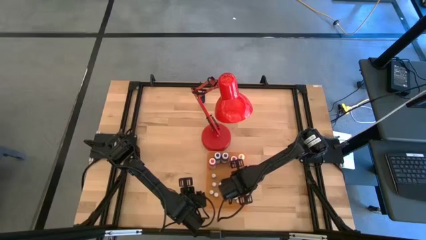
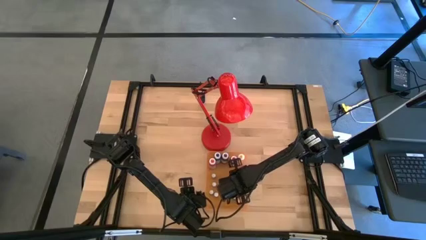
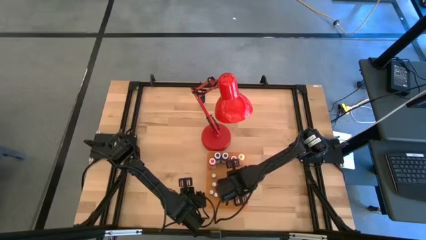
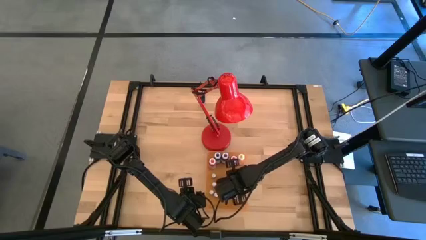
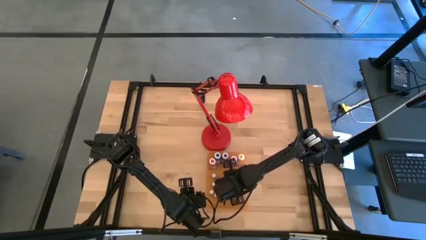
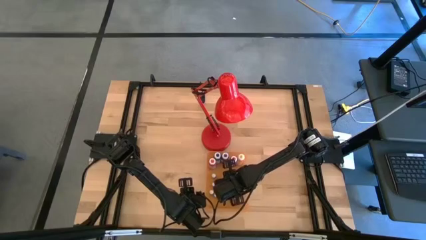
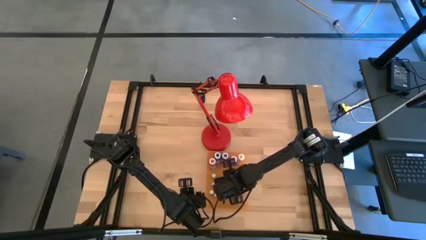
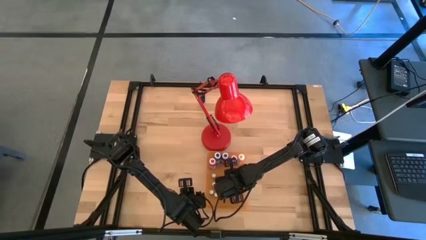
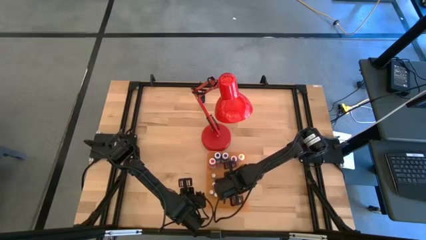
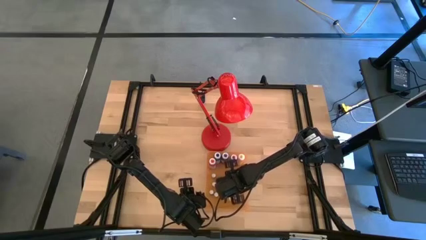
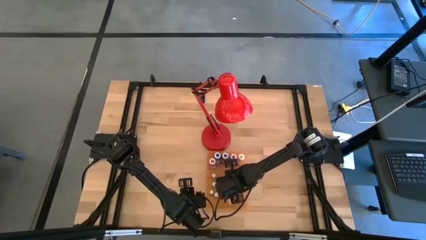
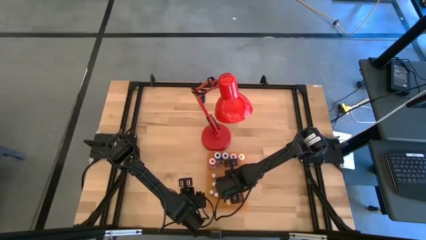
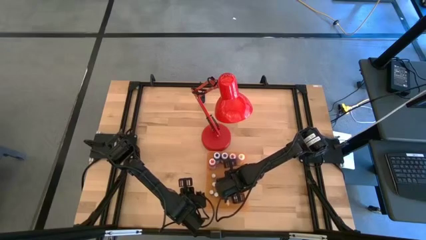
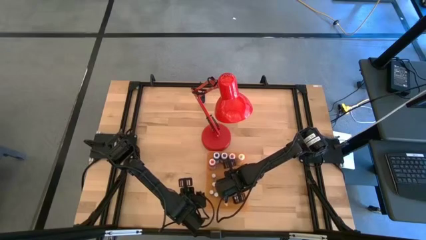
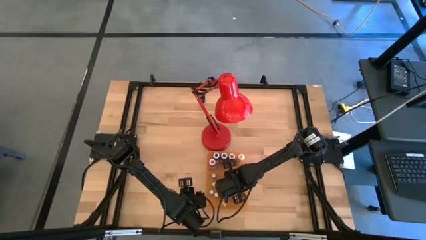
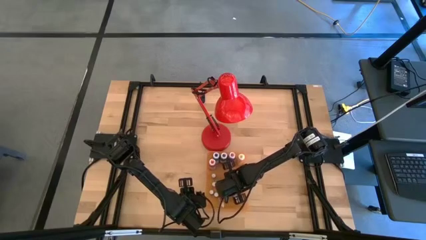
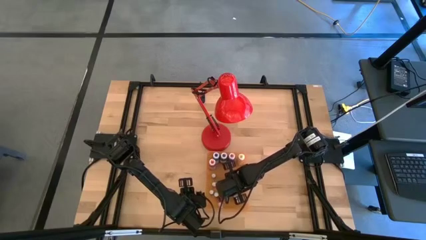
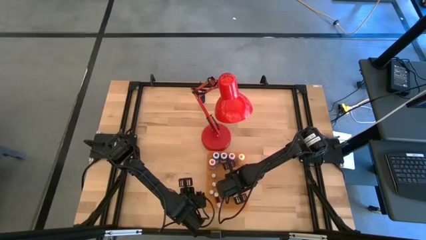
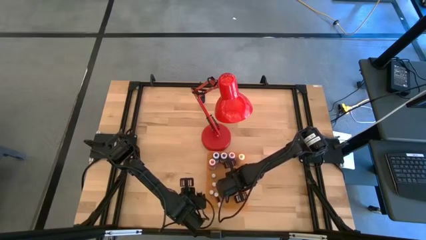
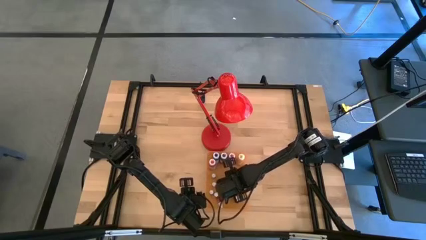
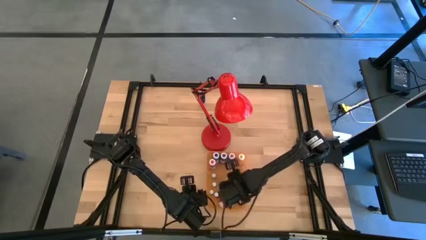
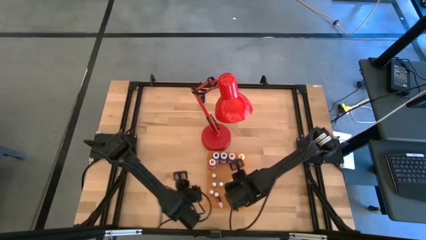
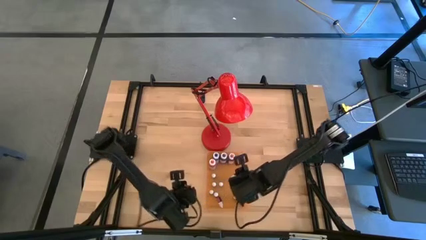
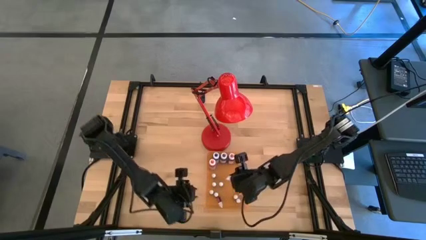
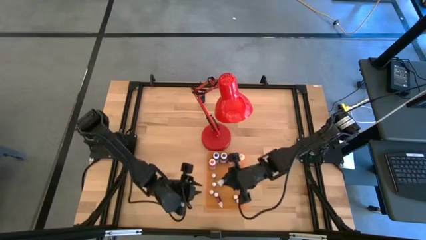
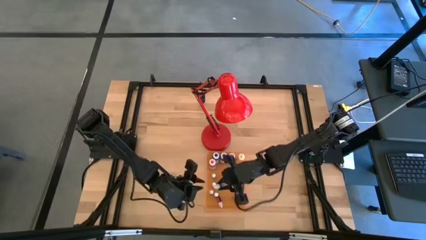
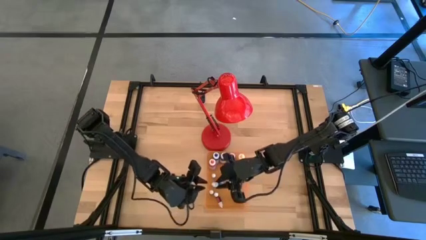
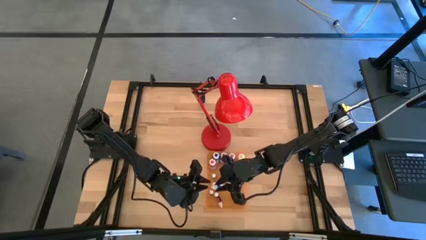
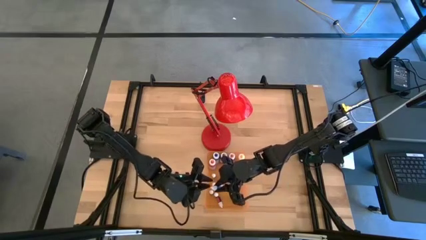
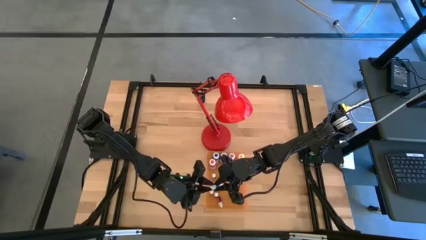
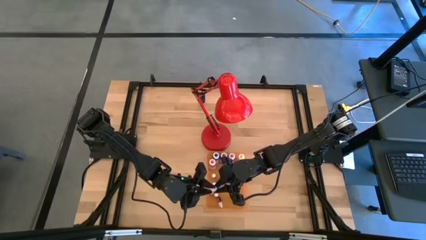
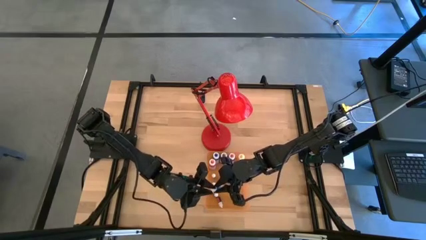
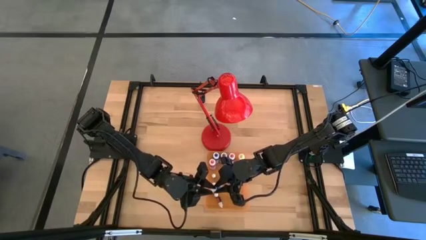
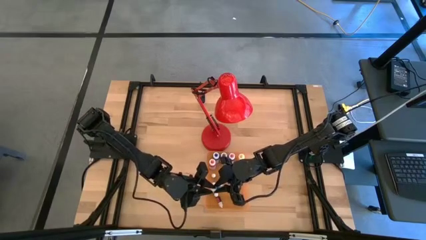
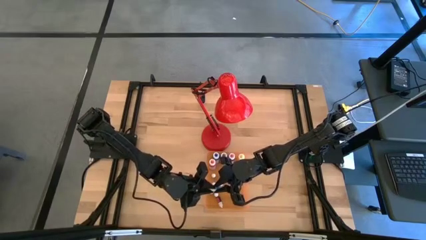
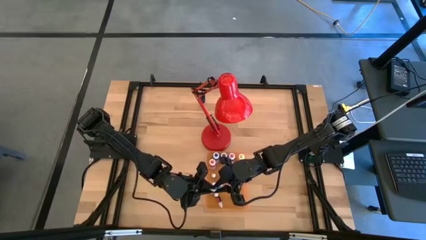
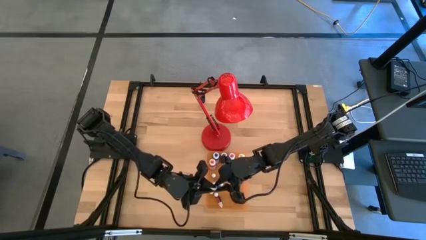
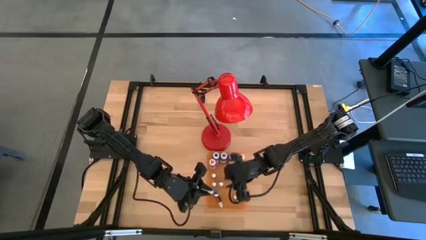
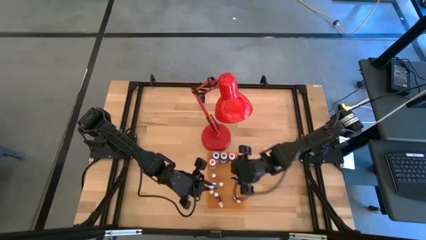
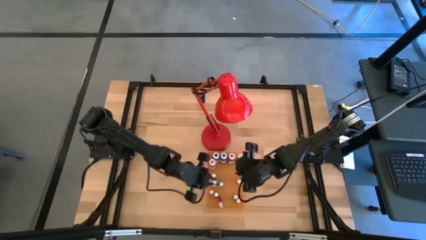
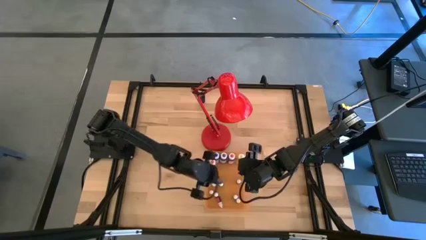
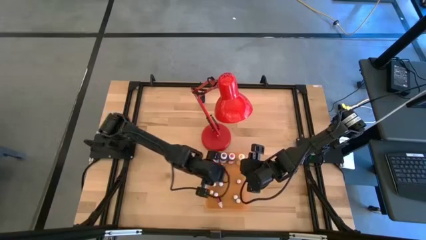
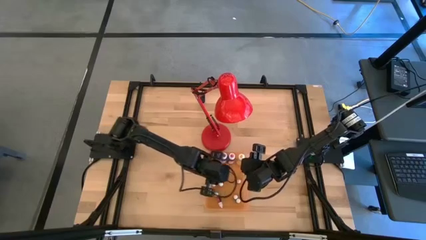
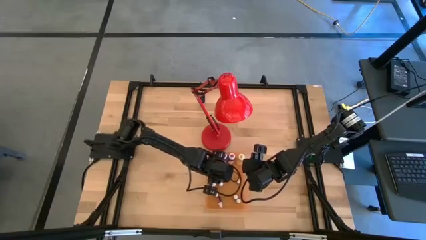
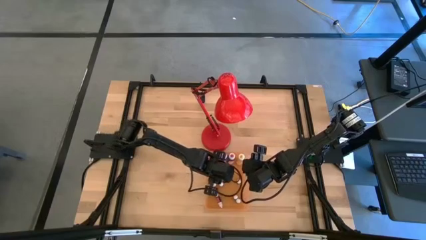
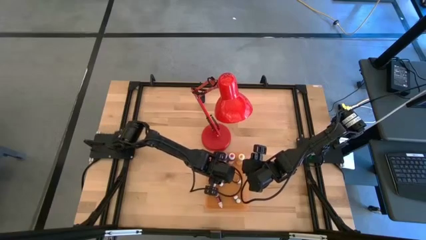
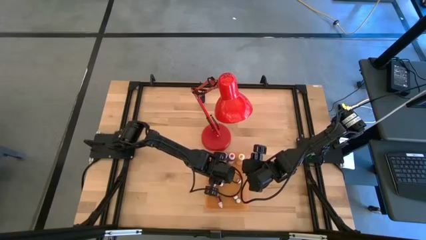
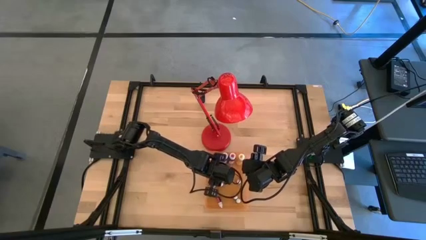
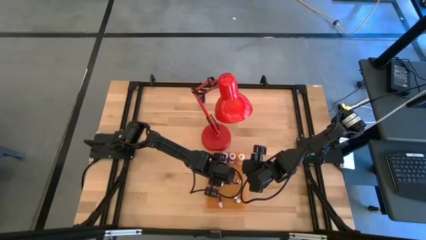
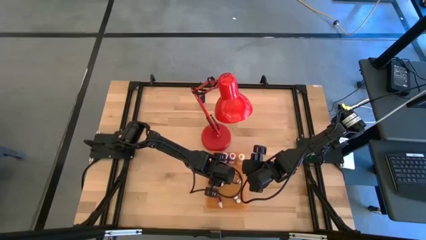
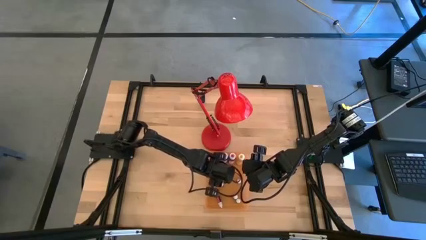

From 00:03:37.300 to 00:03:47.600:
Task: Pick & Place food coloring
Adjust the light blue food coloring bottle in the orange bin

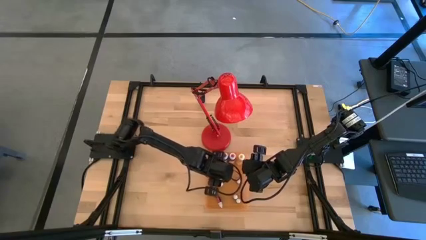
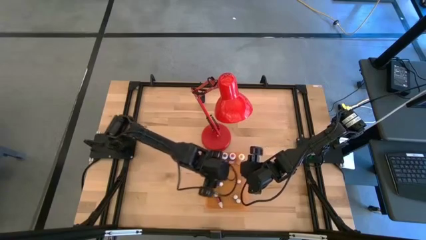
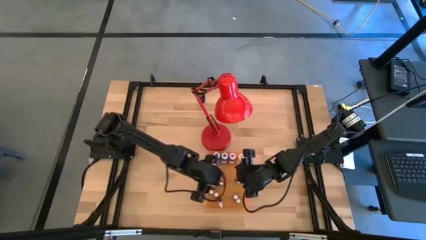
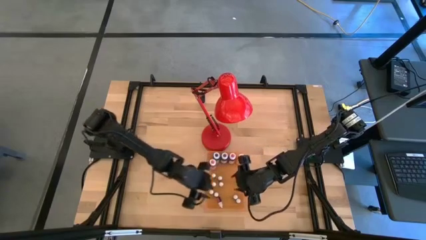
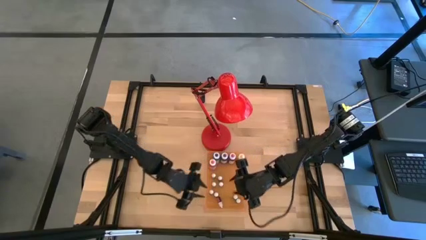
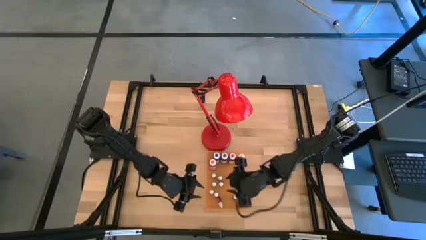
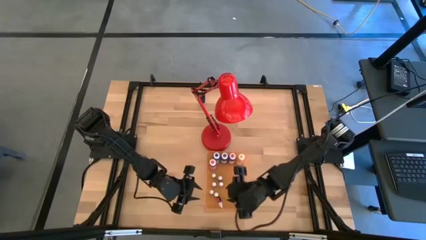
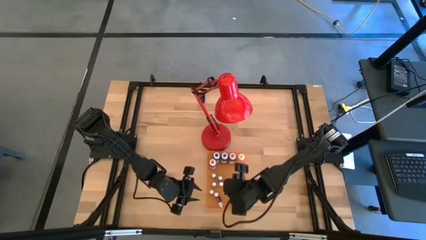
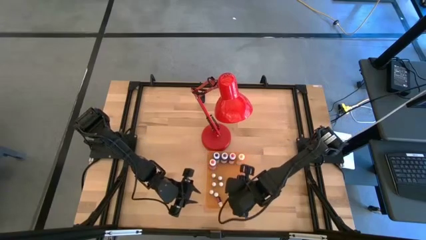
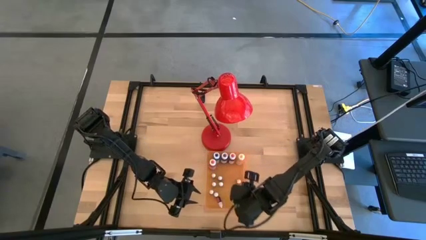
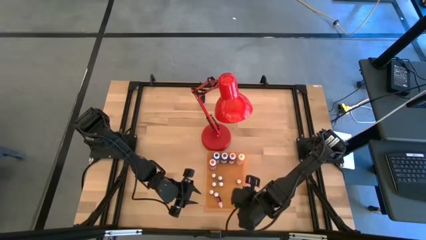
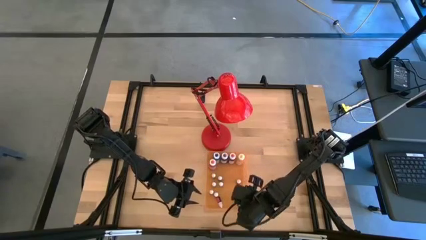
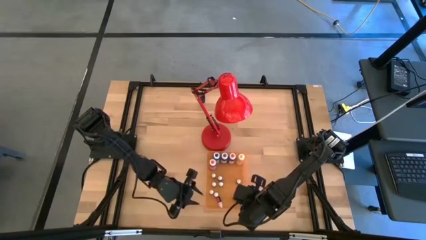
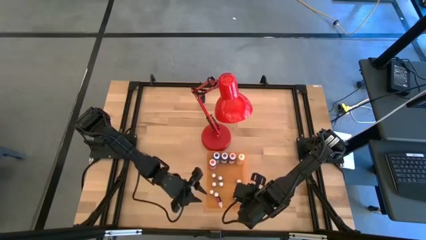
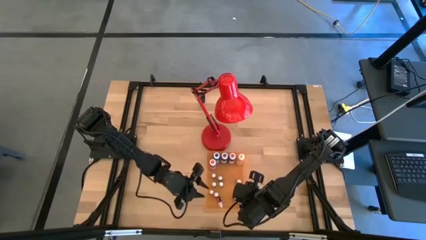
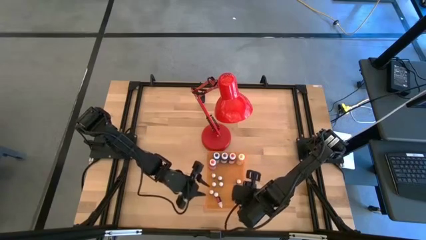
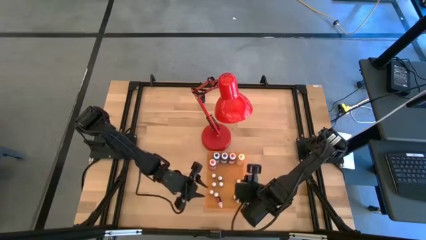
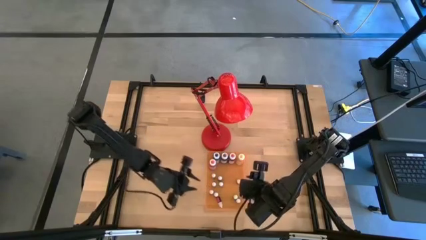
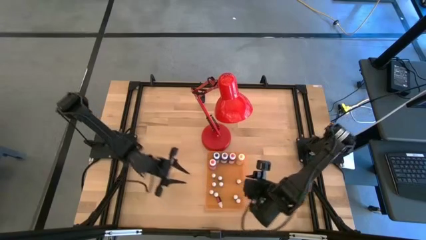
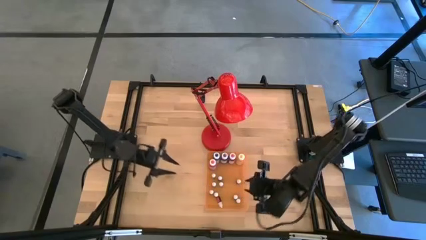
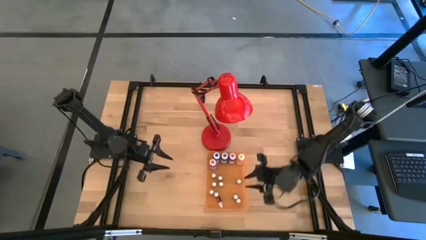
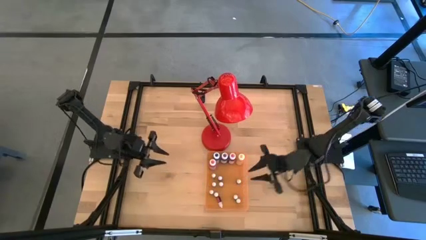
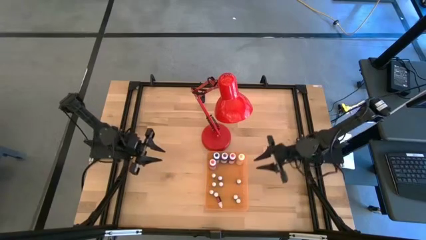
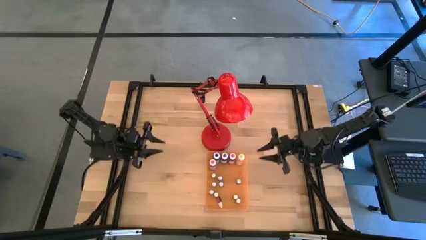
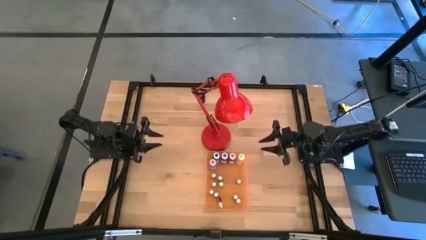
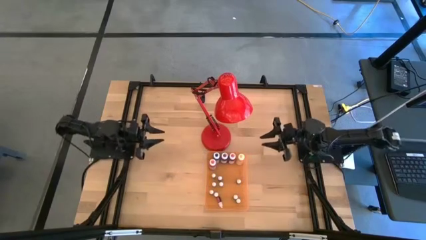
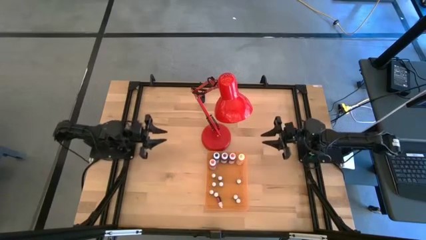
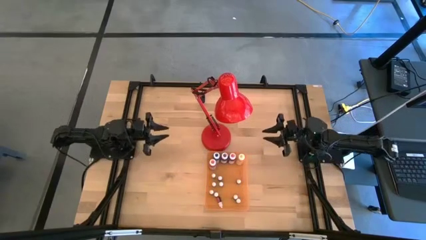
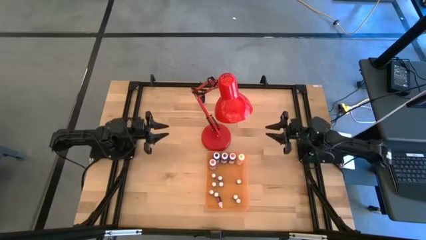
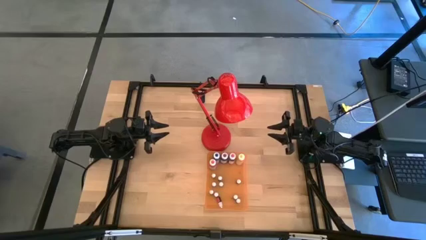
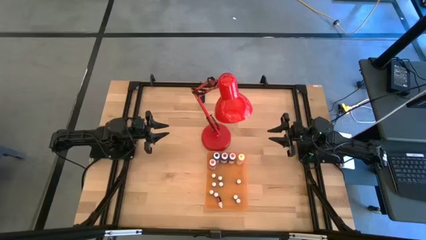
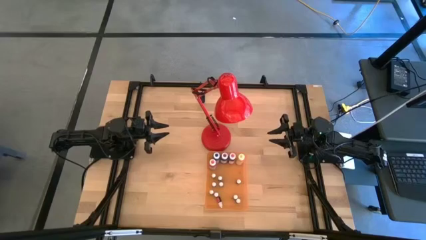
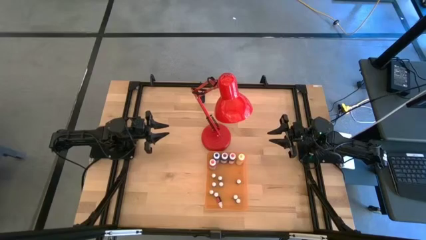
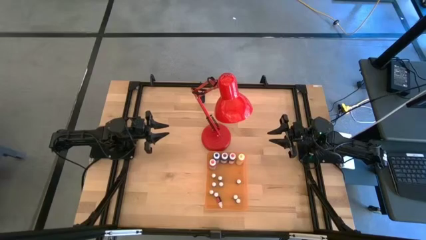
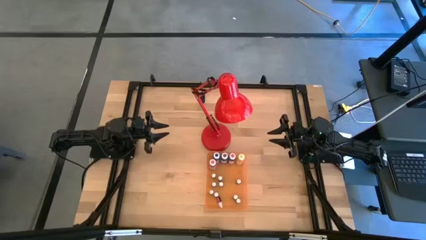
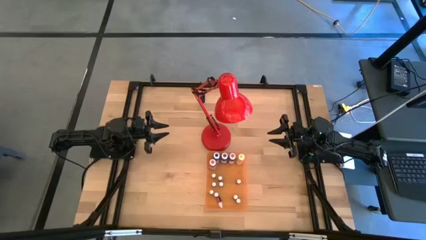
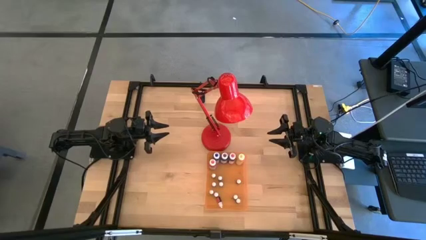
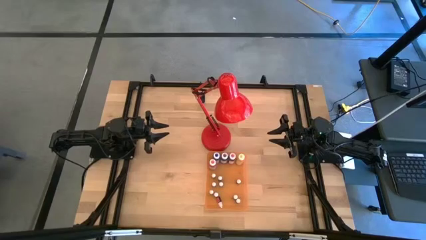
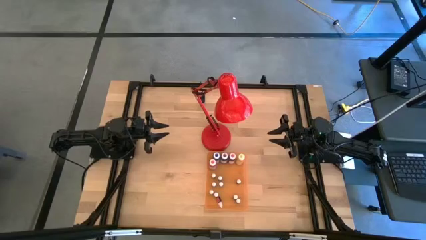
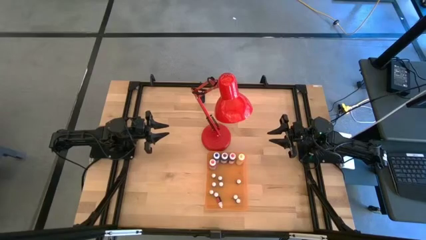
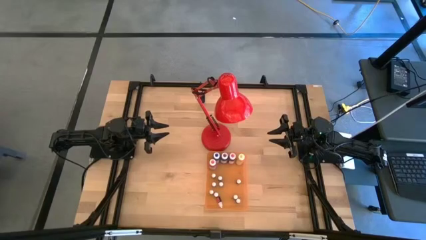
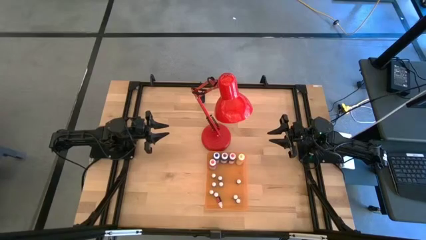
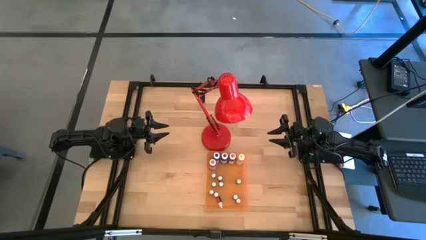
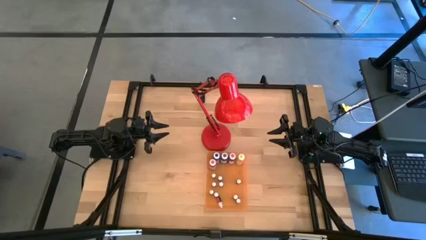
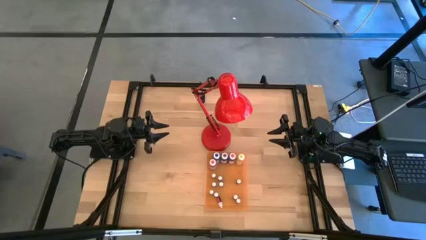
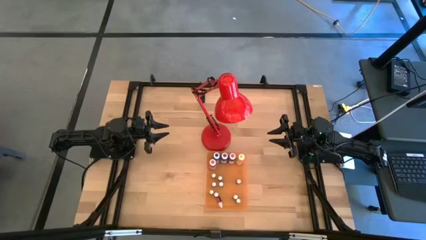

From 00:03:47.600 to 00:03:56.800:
Return to Home Position
